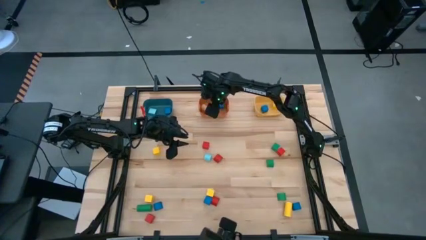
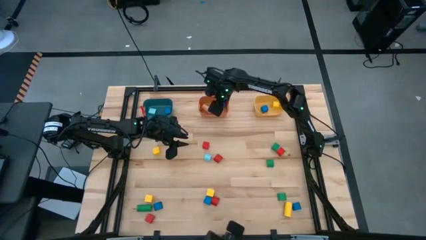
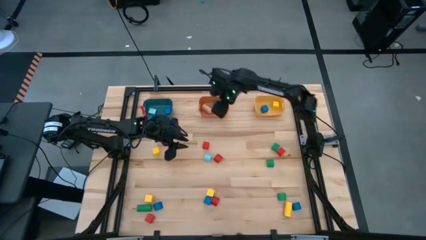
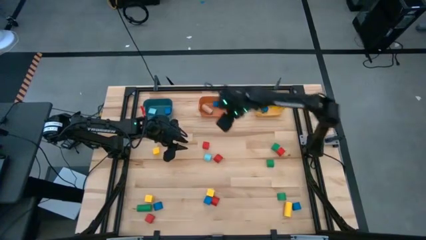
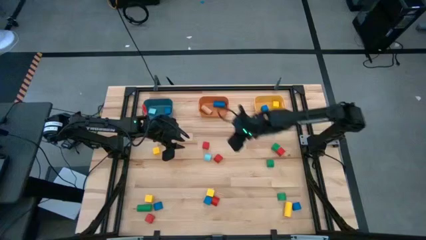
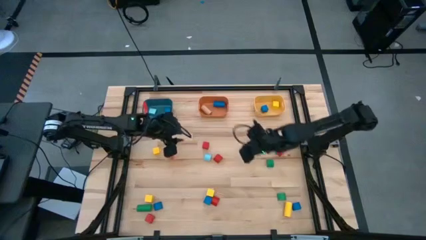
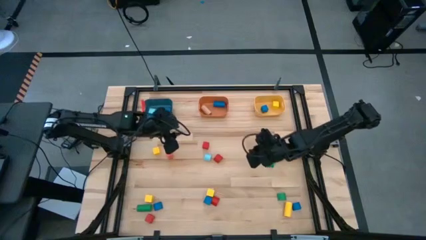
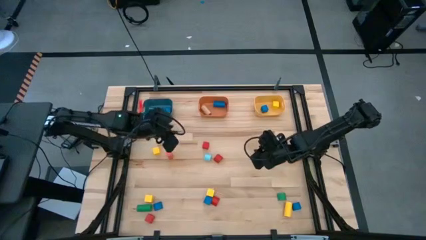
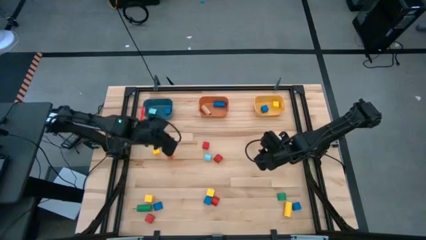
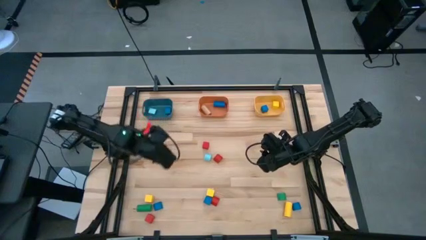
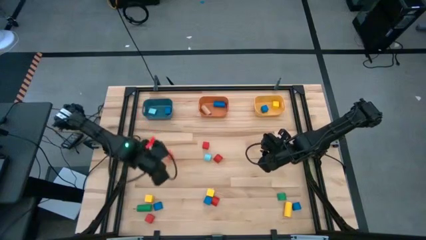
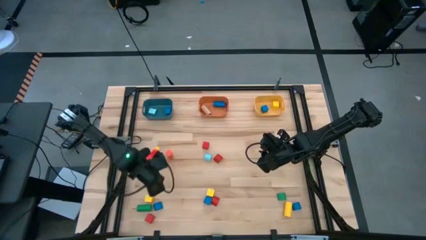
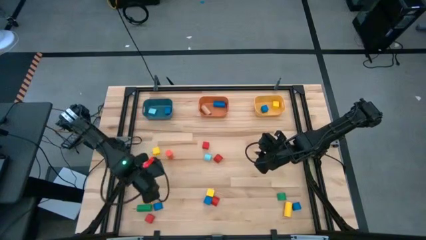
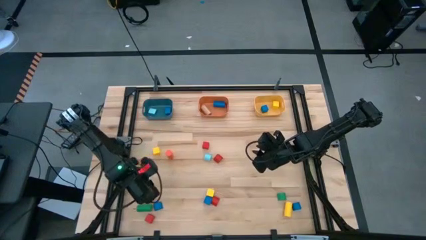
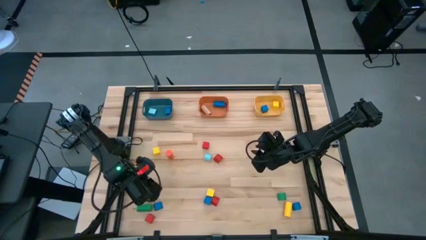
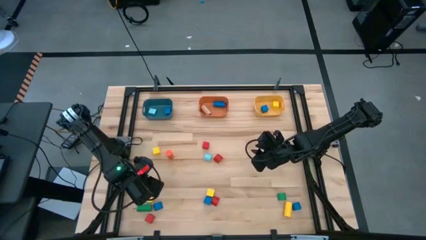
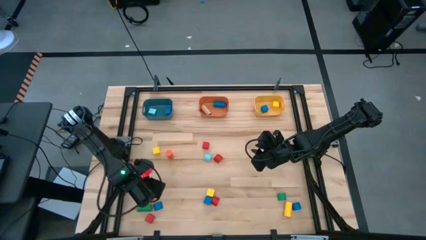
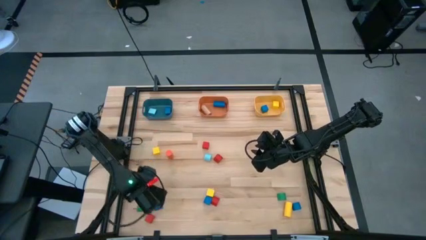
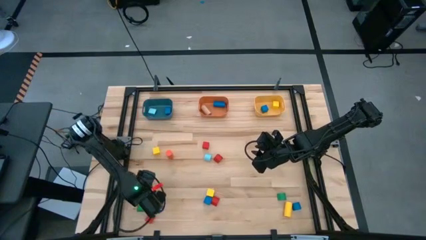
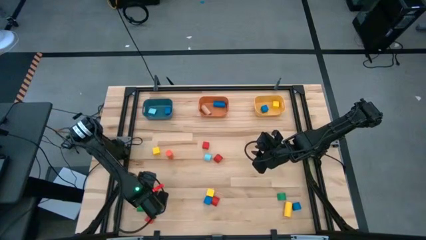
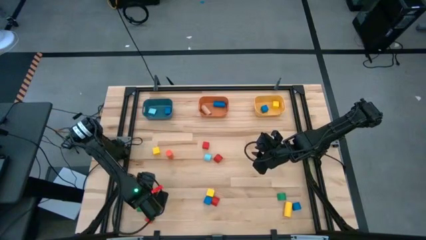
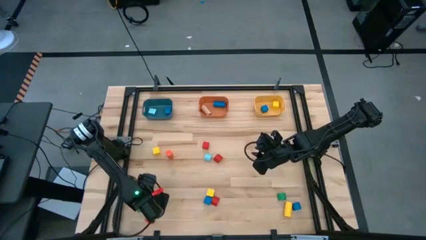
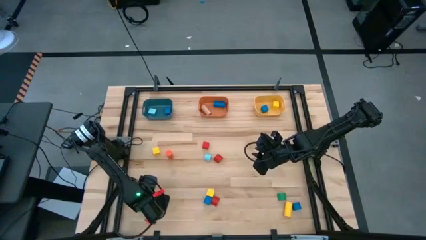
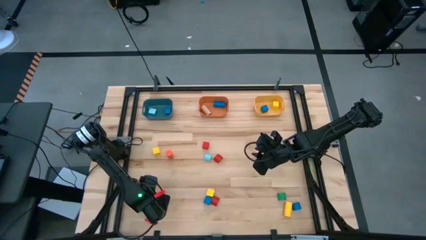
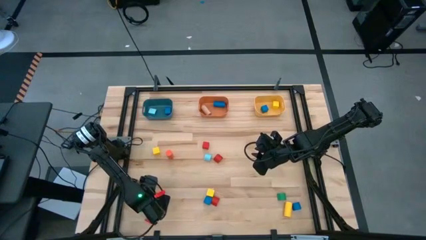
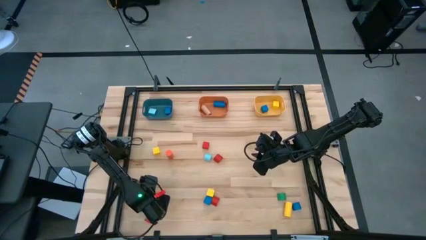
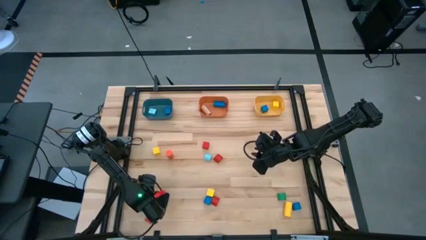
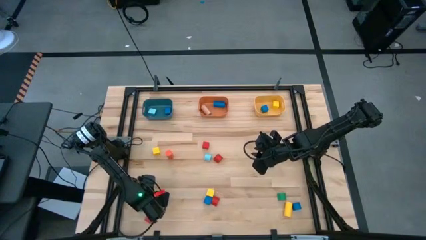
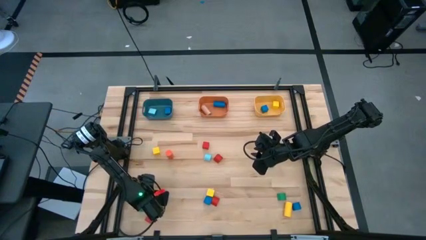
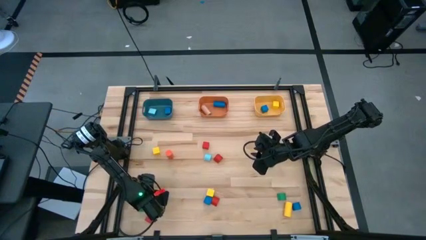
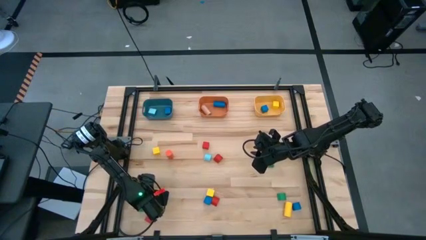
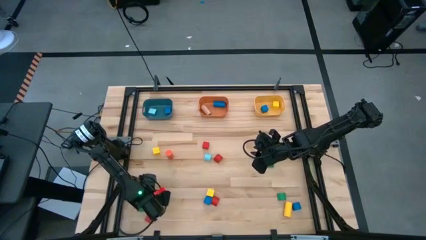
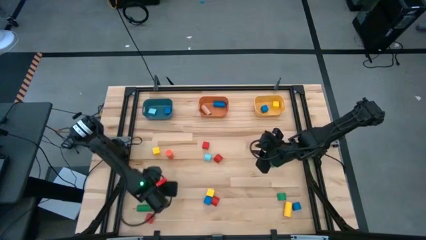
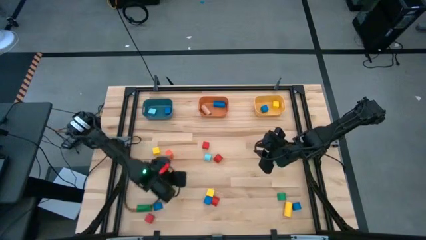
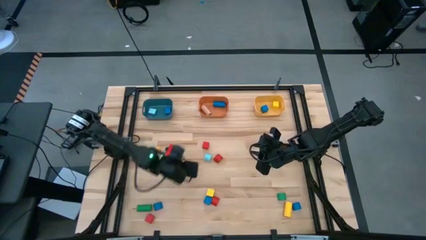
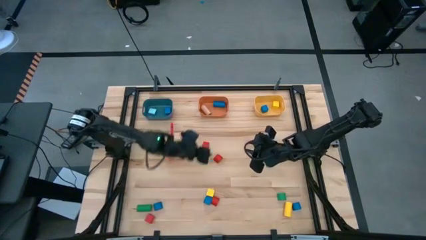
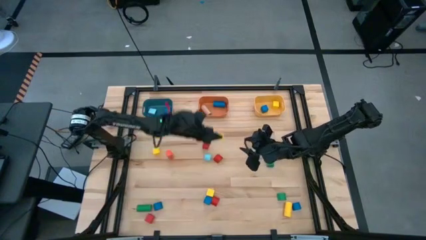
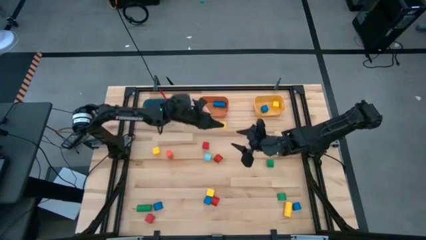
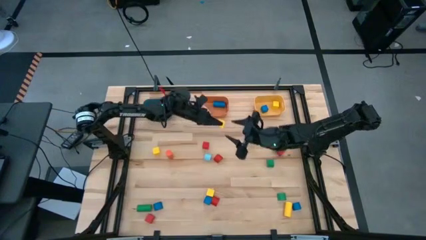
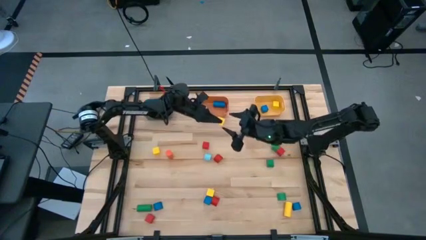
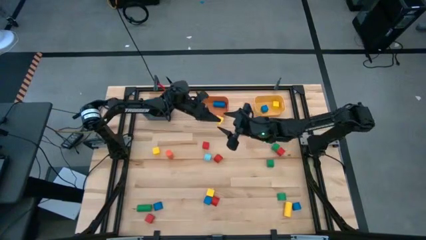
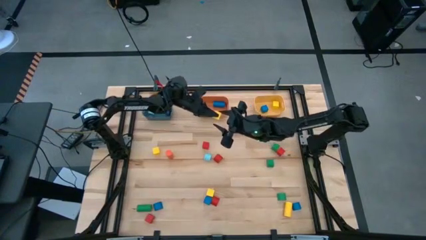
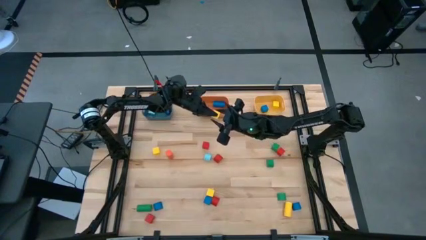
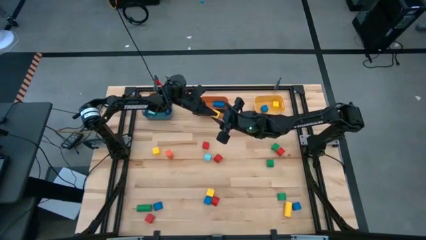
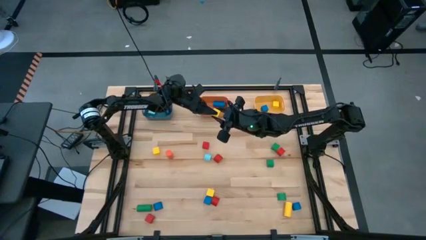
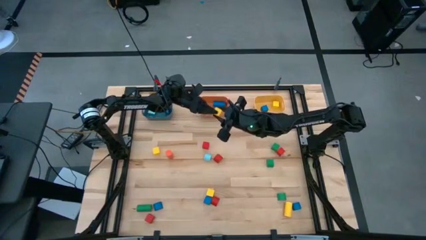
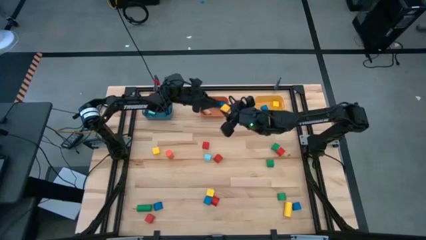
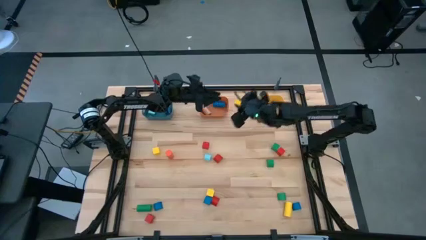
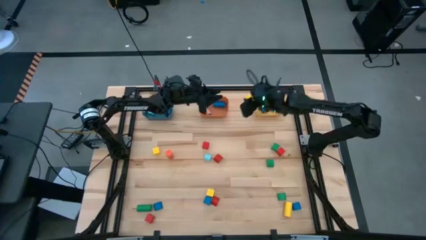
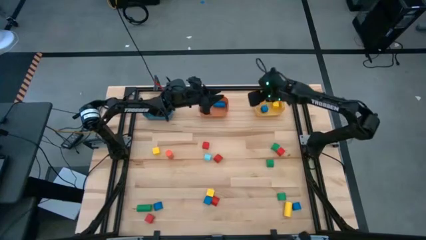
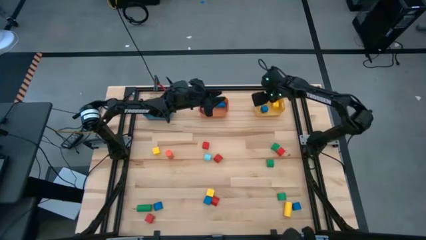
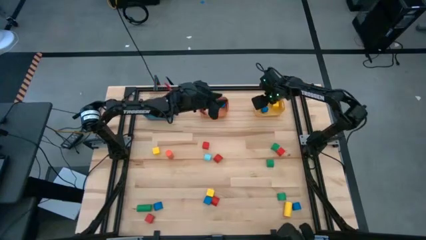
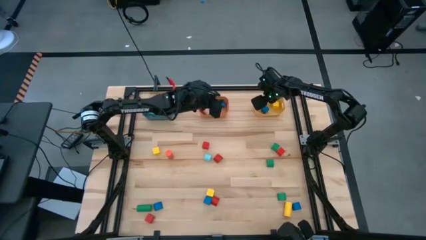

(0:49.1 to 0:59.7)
Task: Sort blocks by size
Put the yellow cube block into the yellow bin

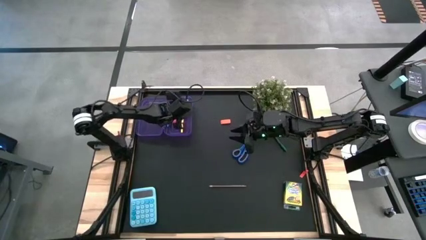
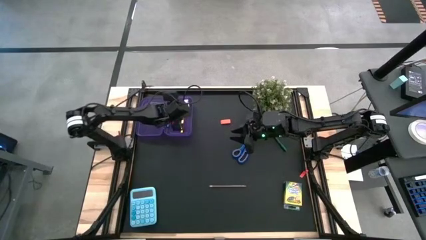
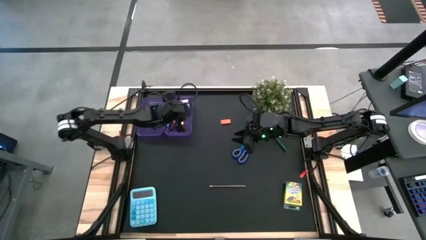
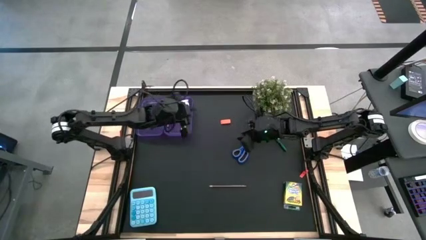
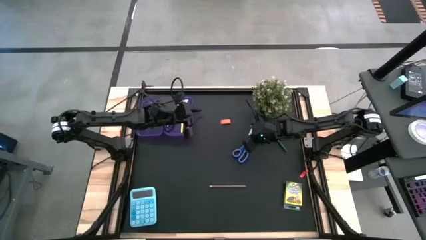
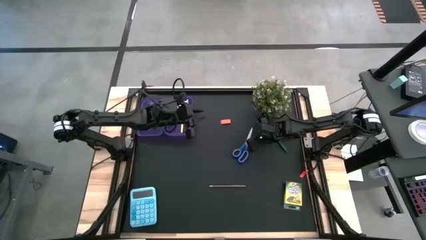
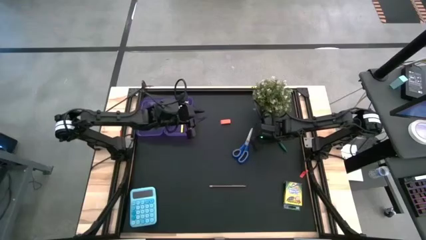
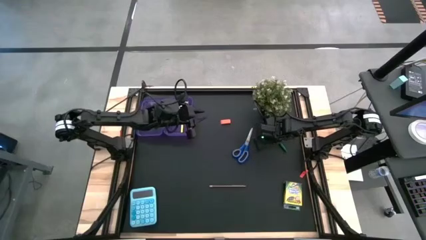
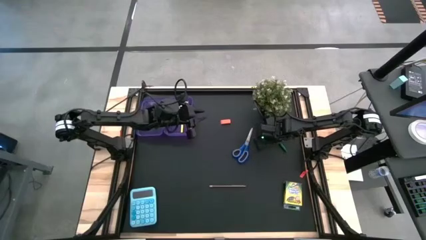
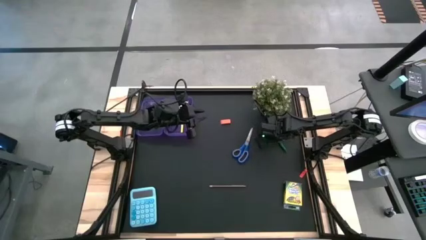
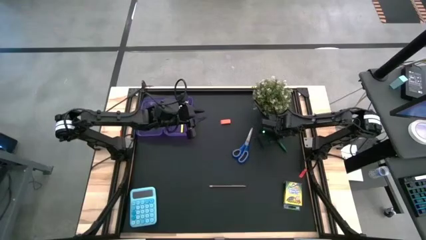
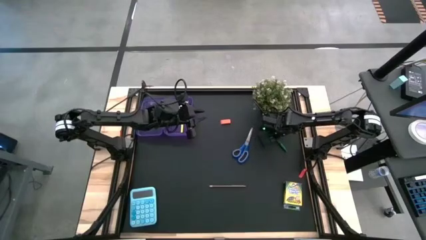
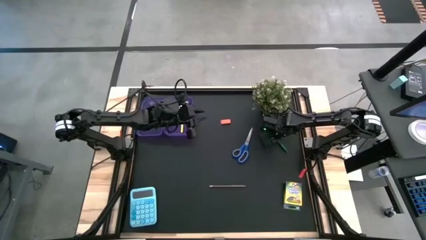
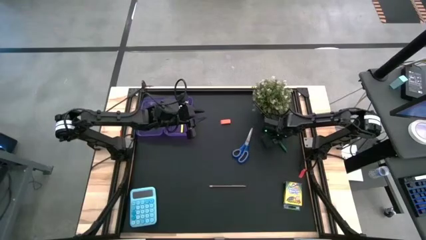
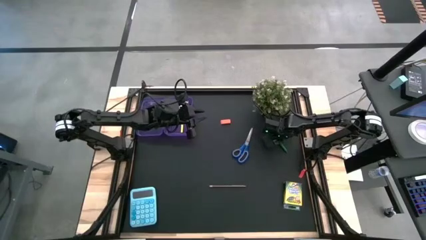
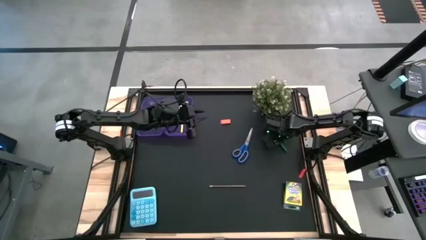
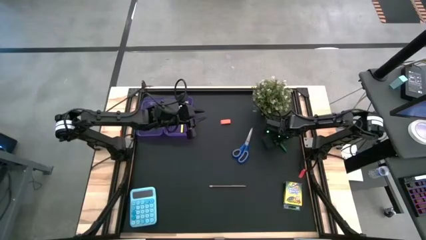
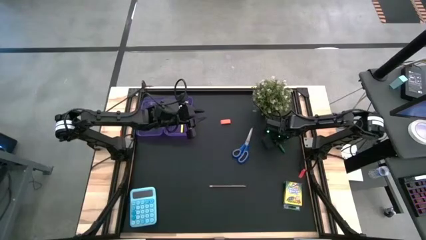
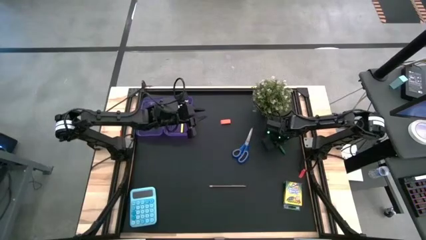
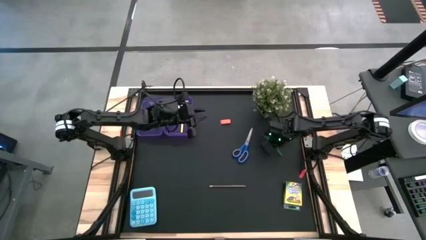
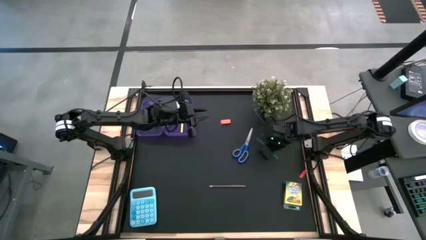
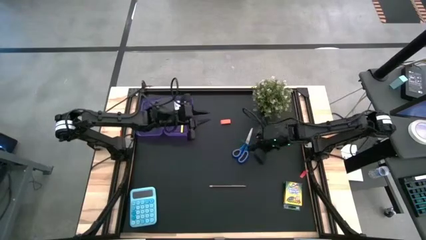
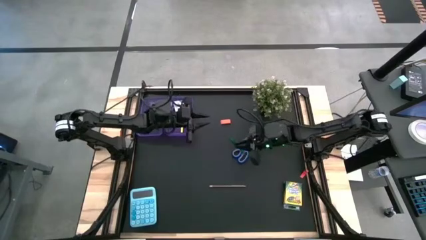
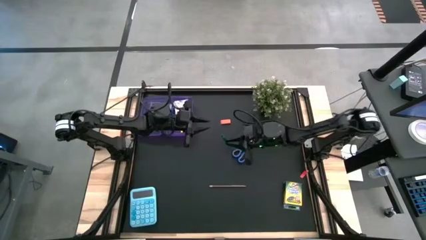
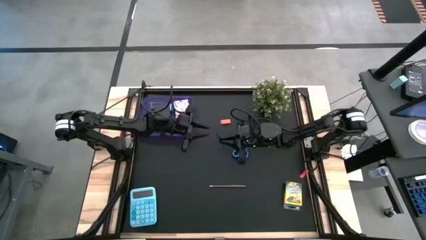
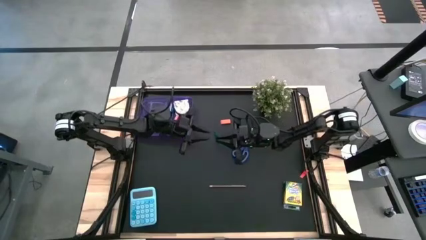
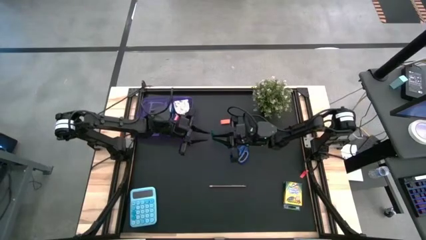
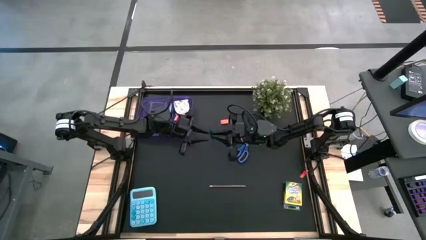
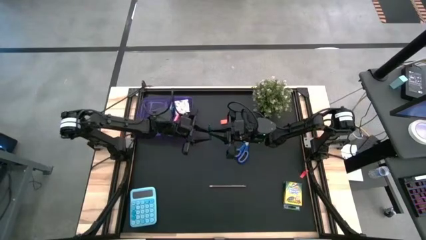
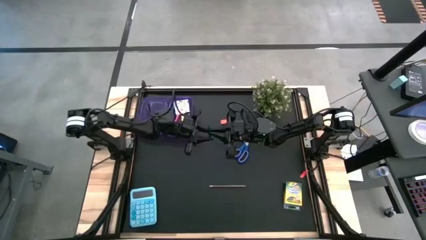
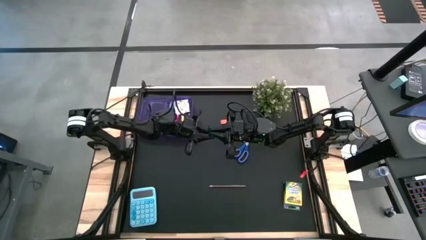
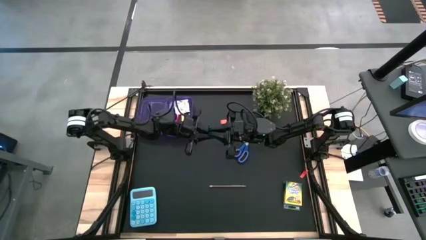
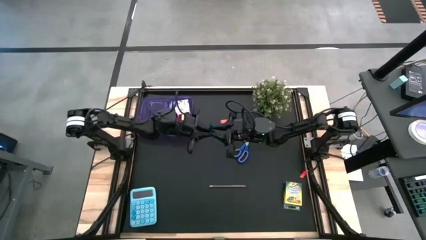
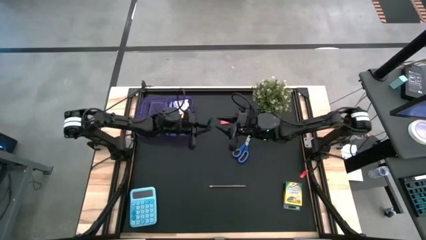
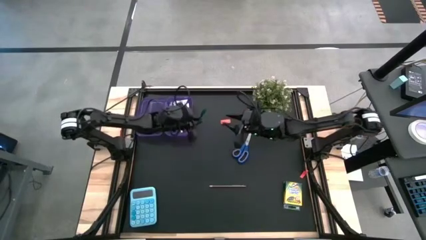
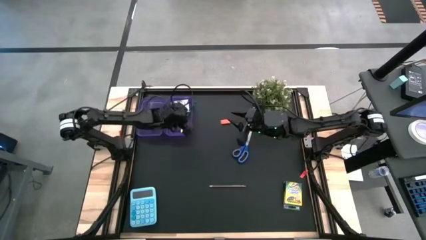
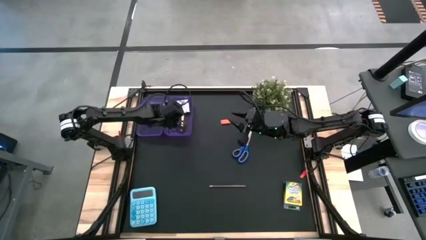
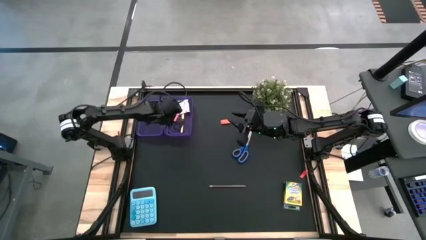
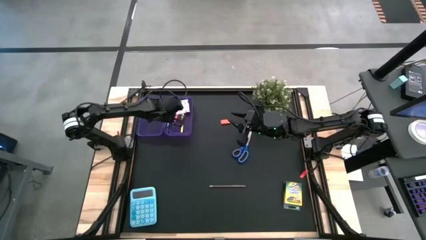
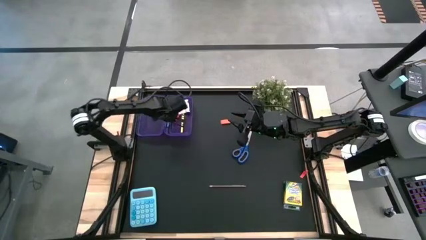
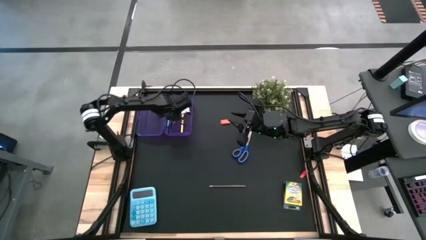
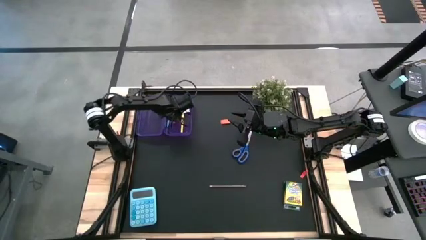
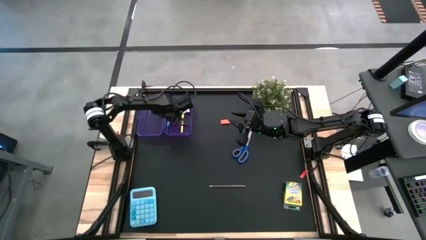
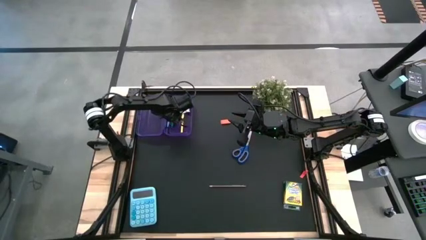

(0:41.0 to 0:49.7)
Task: Pack school essentials
Put the green pen into the purple box
